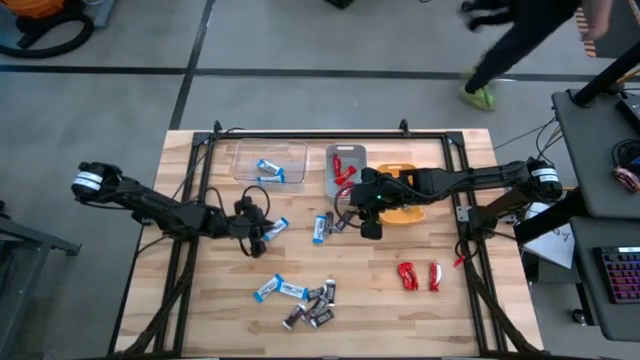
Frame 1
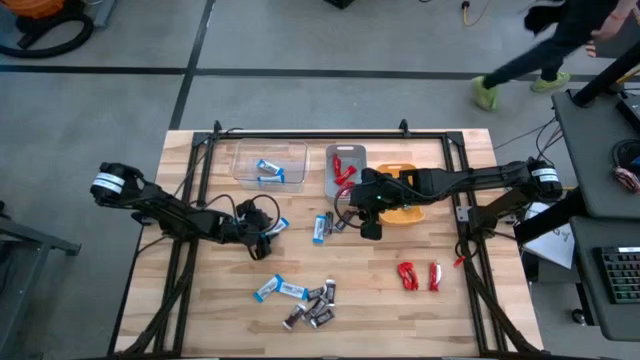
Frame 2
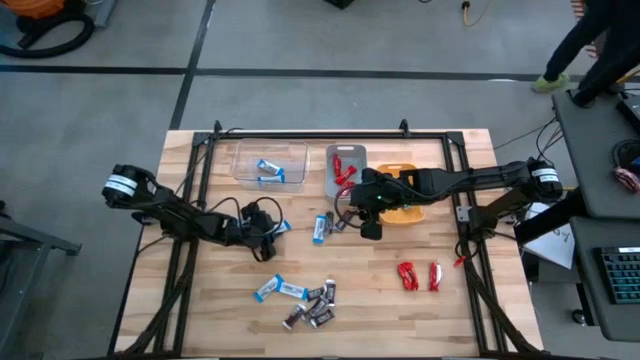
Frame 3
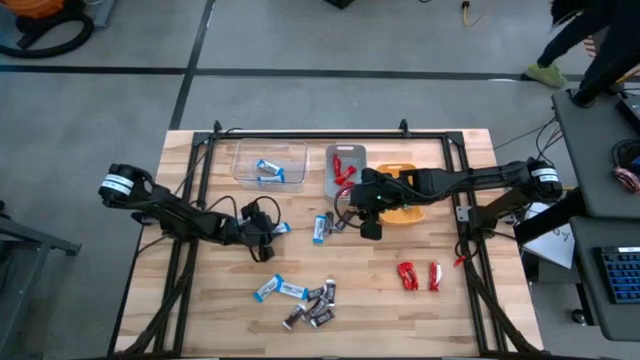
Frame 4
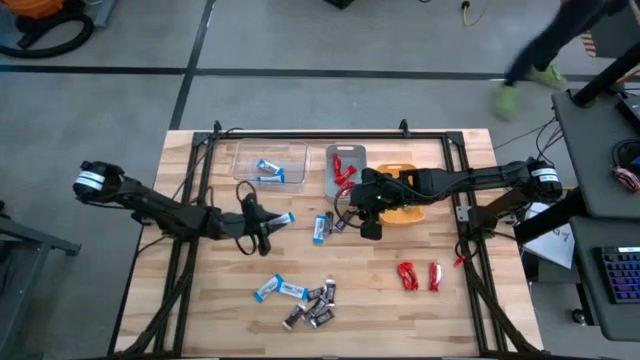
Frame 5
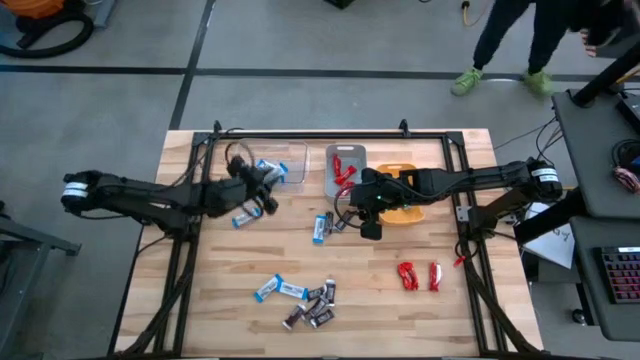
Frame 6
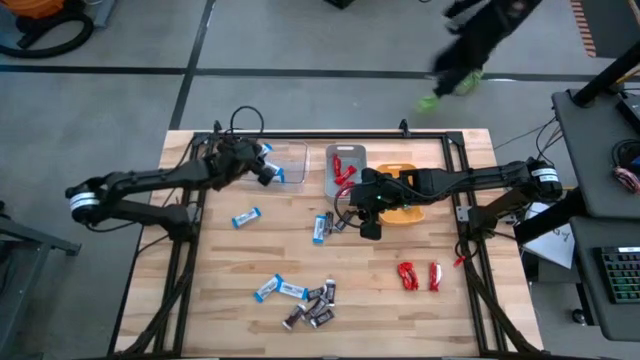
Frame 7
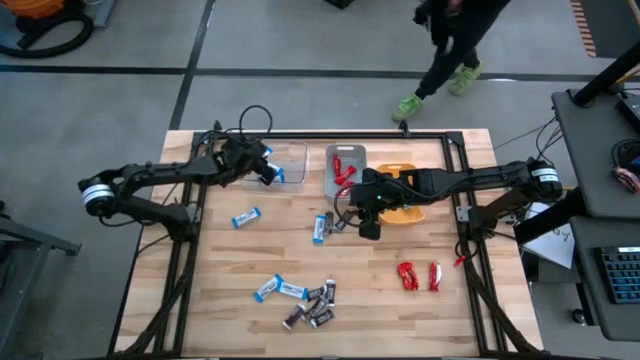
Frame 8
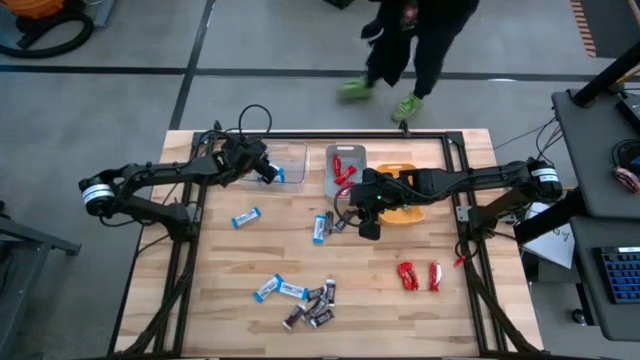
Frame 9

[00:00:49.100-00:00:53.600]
Task: Organize candy in baskets
Put the white chocolate into the transparent bin

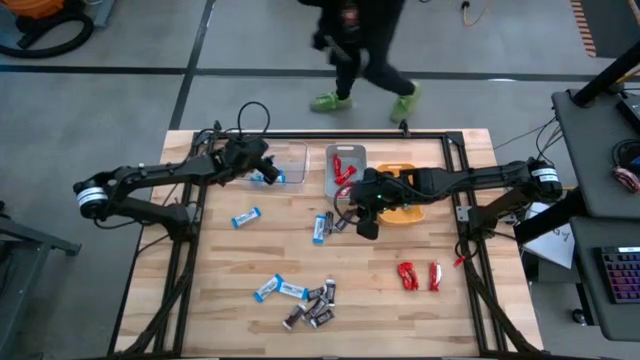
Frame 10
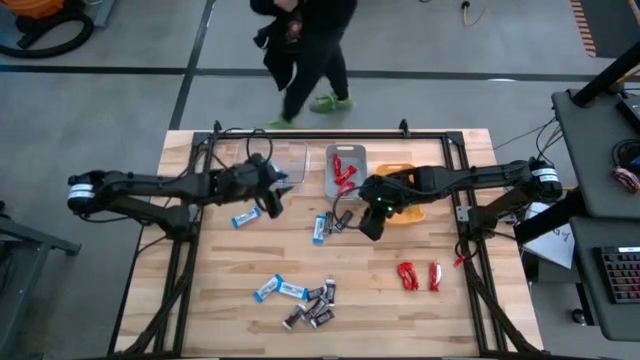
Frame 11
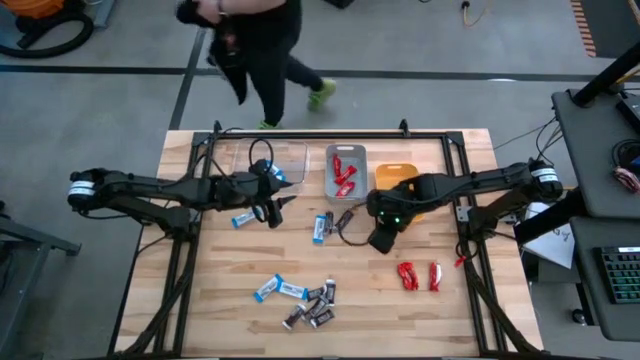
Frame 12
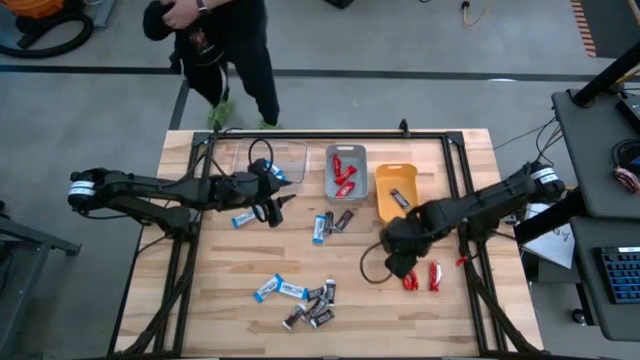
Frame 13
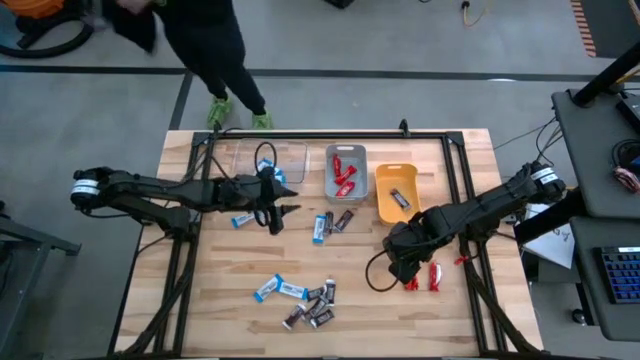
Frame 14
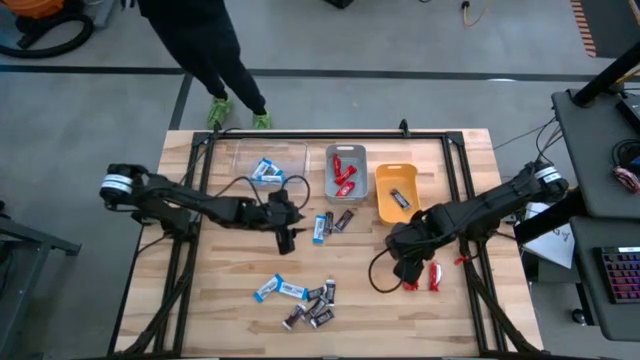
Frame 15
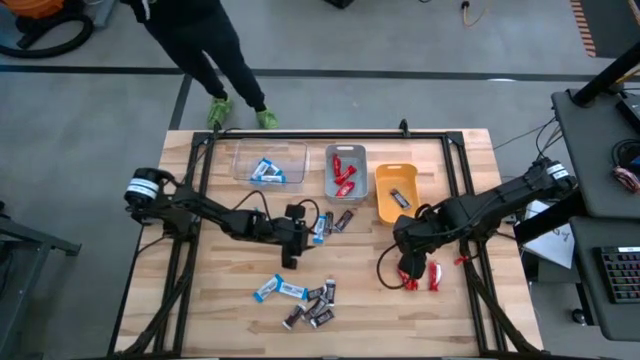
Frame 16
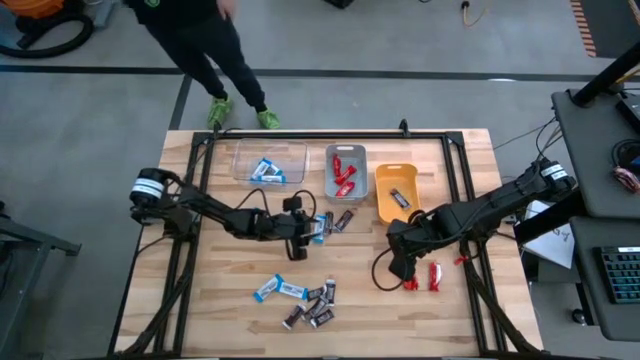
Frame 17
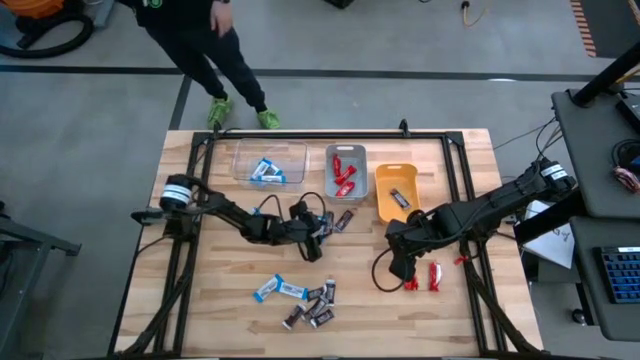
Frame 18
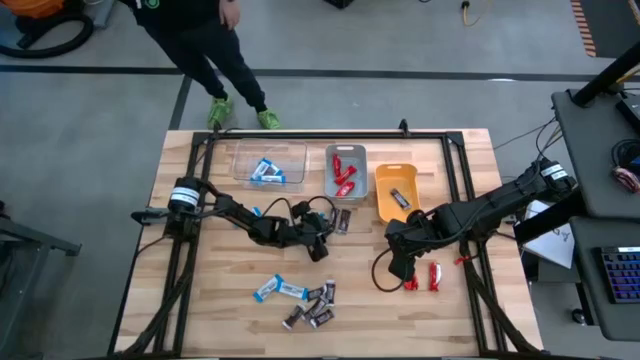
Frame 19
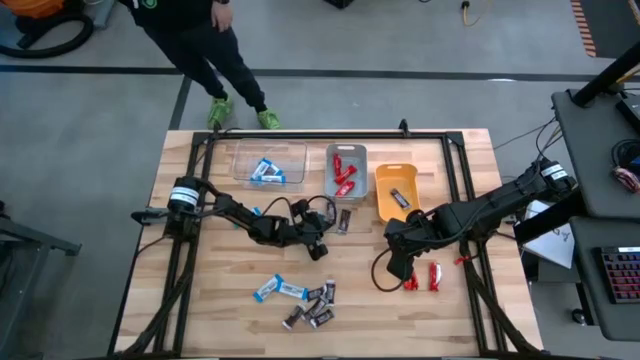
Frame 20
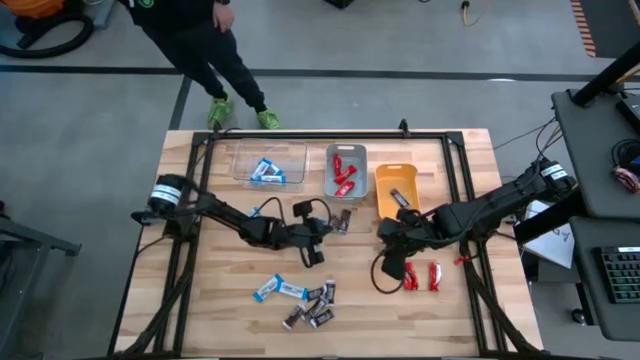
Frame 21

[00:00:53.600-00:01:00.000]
Put the brown chocolate into the yellow bin

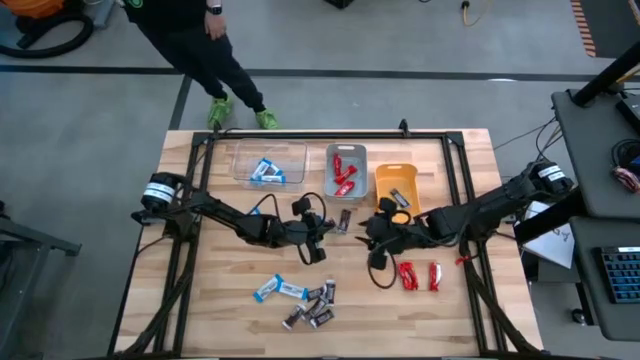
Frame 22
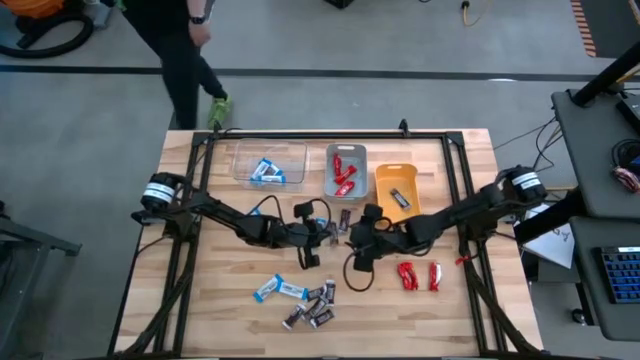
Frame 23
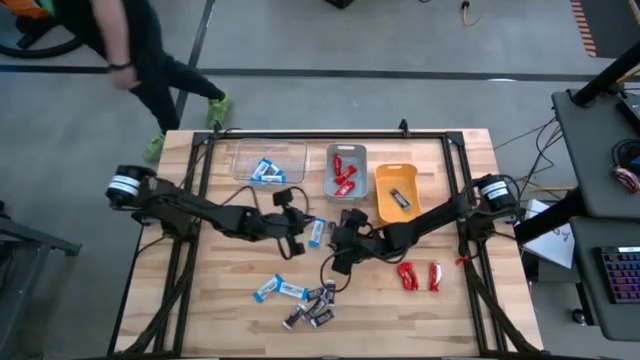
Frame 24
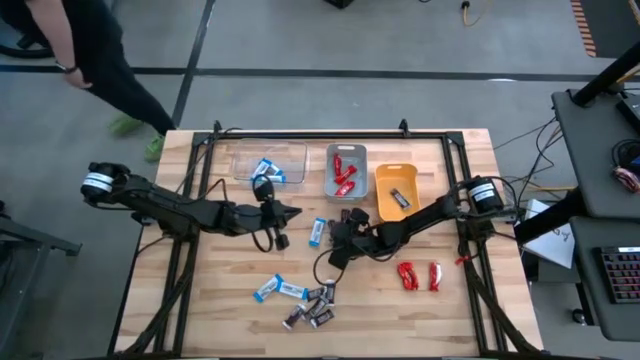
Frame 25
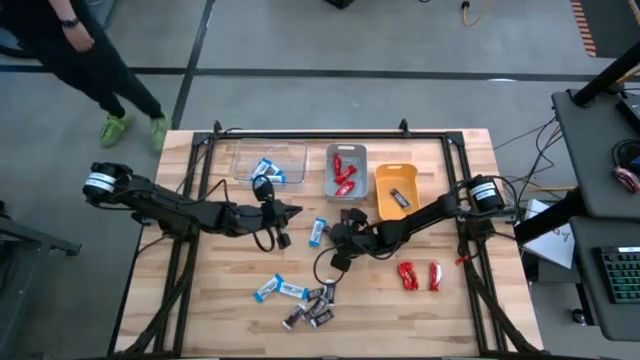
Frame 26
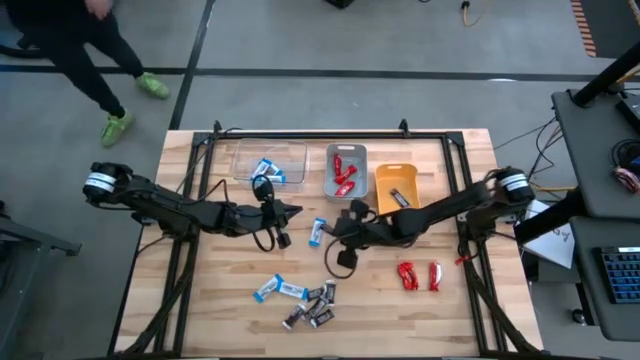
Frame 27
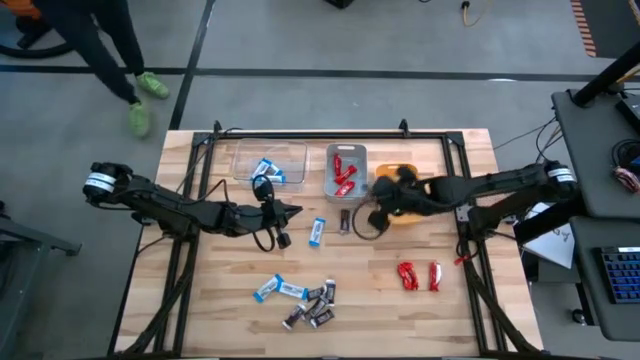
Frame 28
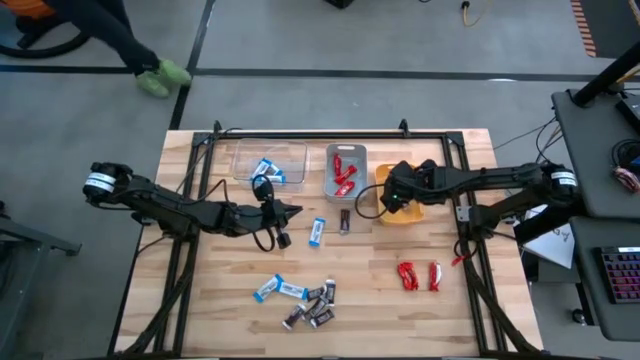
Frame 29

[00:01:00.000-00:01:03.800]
Put the brown chocolate into the yellow bin

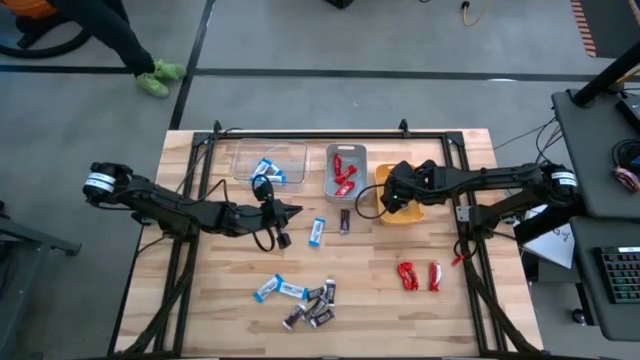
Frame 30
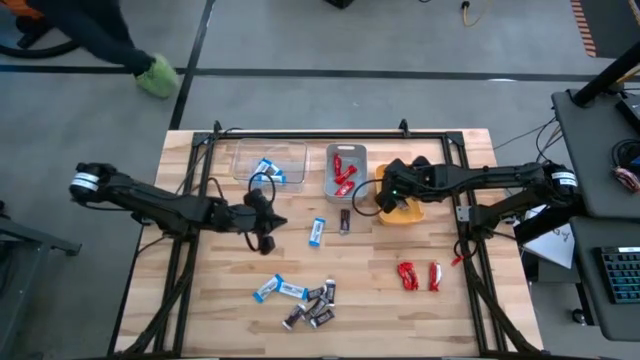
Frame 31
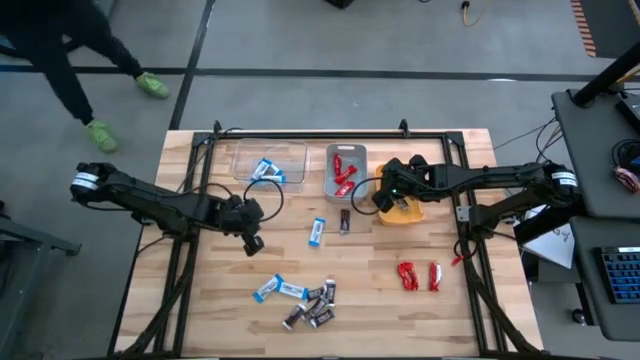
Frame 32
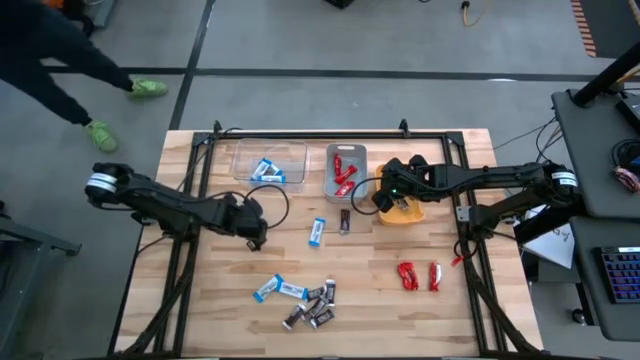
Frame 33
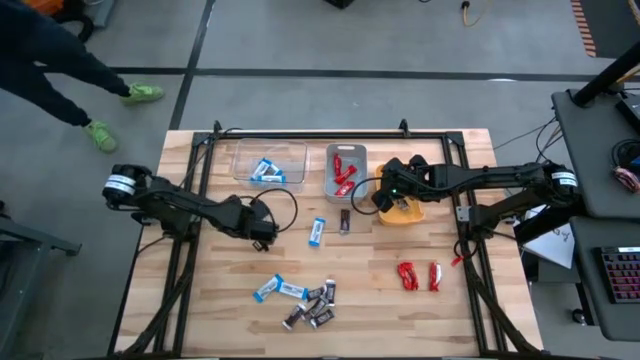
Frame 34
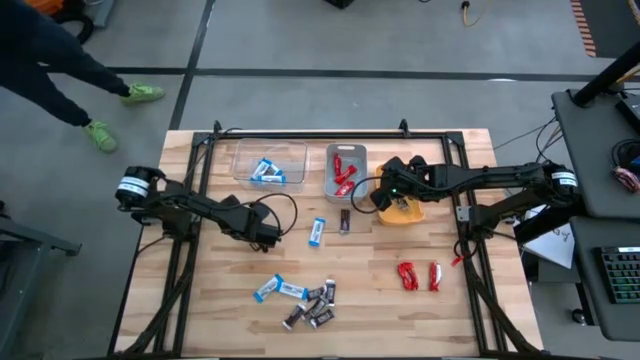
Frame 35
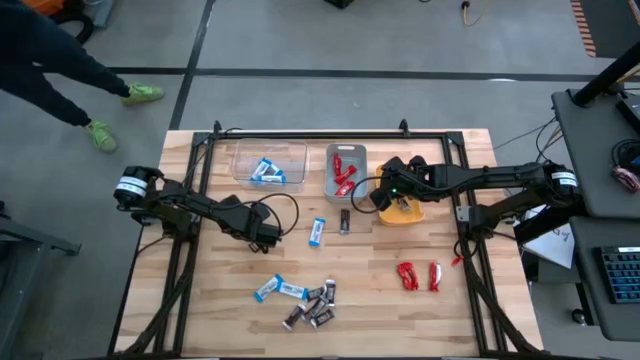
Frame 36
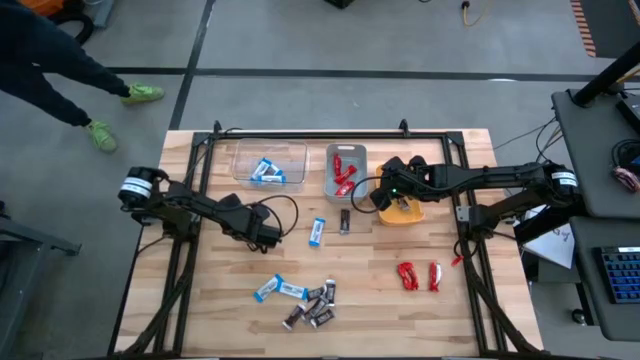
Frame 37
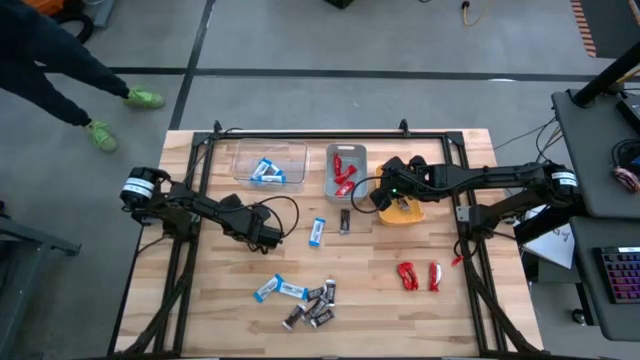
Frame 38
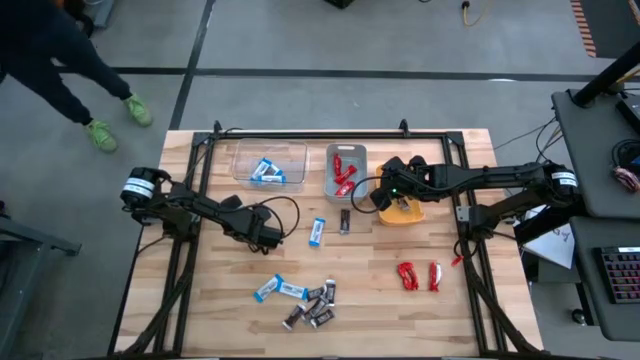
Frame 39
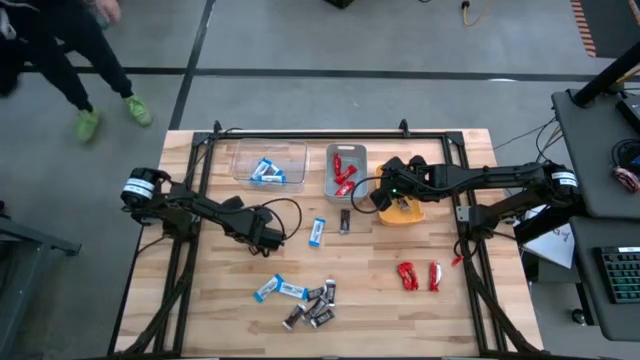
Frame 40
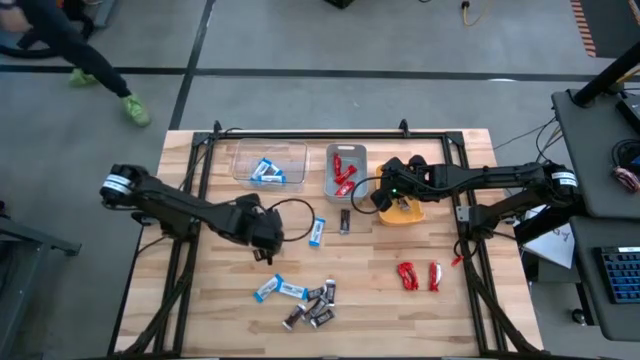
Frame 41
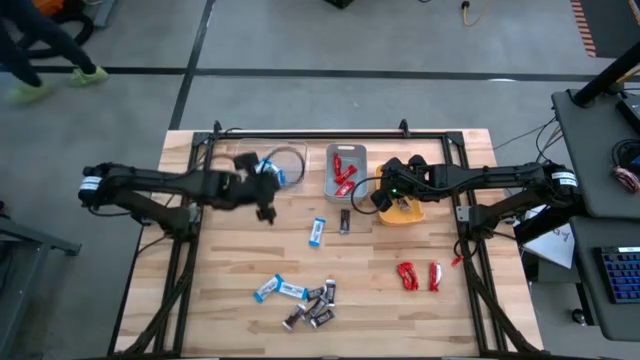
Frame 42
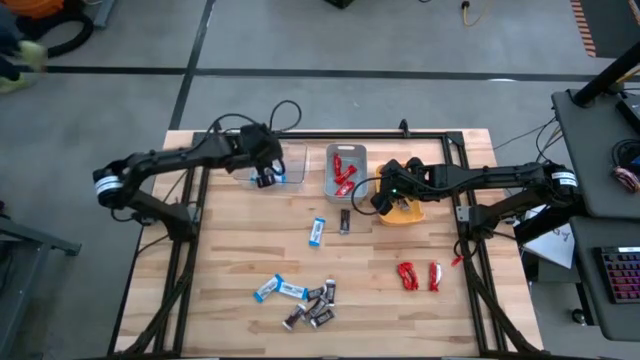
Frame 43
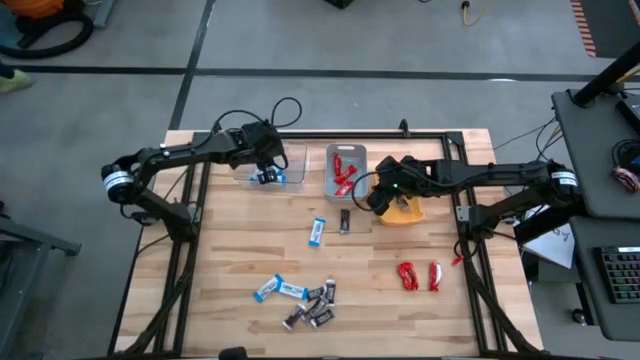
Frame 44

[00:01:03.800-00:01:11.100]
Put the white chocolate into the transparent bin
